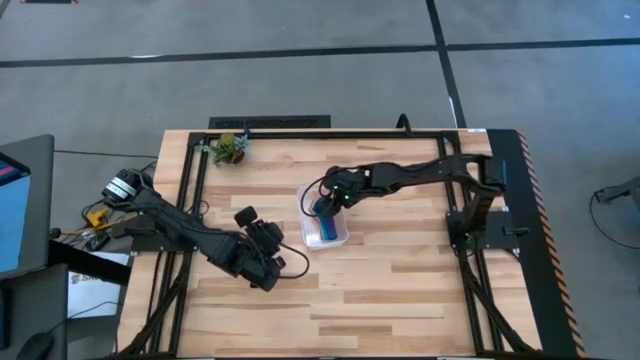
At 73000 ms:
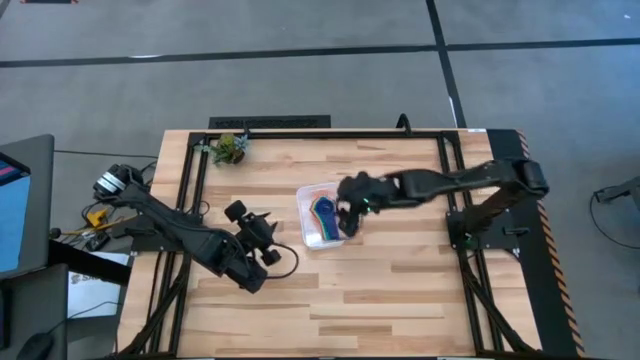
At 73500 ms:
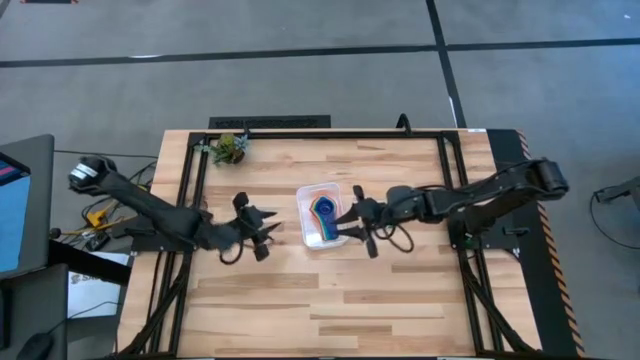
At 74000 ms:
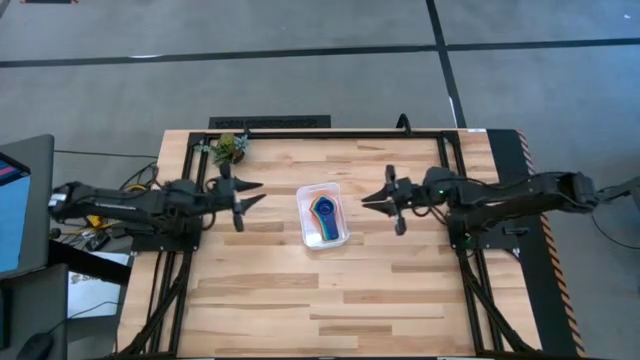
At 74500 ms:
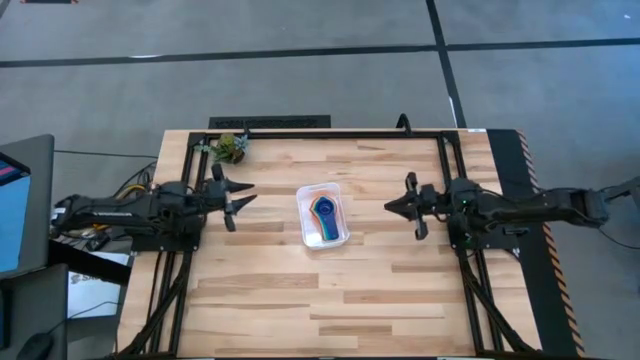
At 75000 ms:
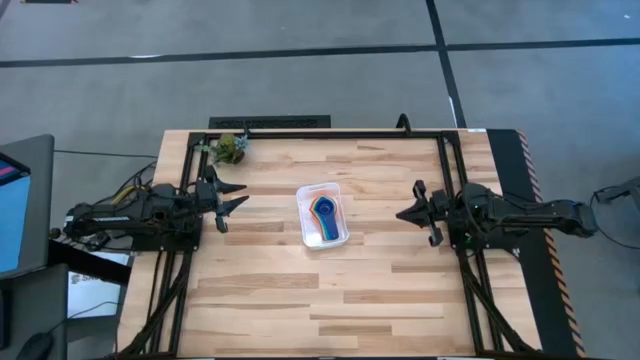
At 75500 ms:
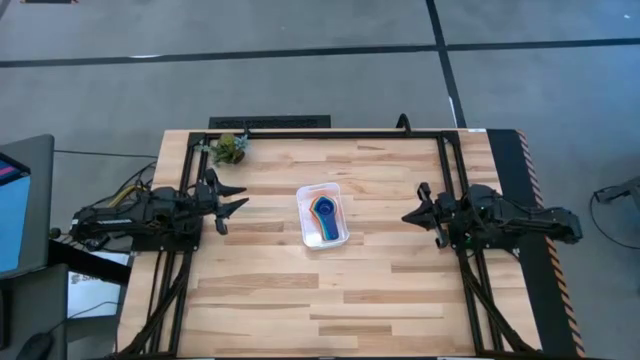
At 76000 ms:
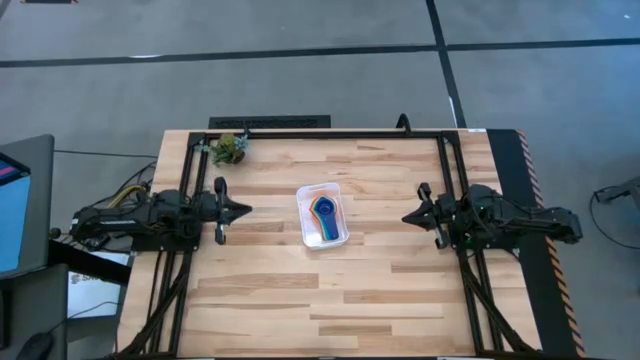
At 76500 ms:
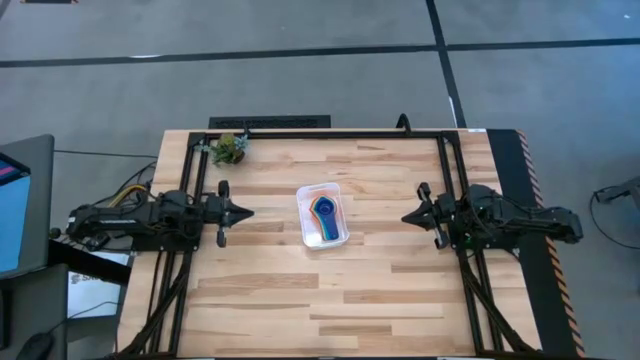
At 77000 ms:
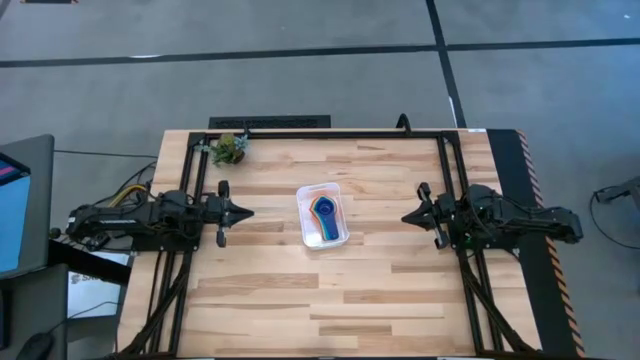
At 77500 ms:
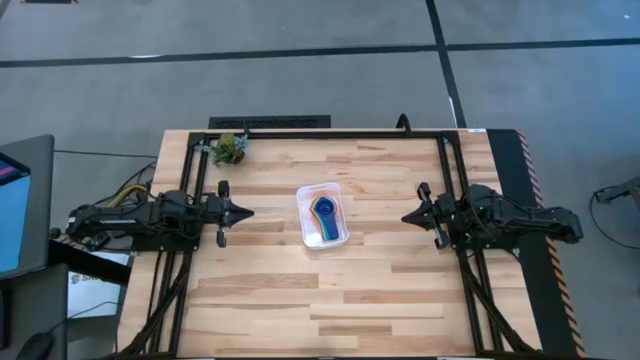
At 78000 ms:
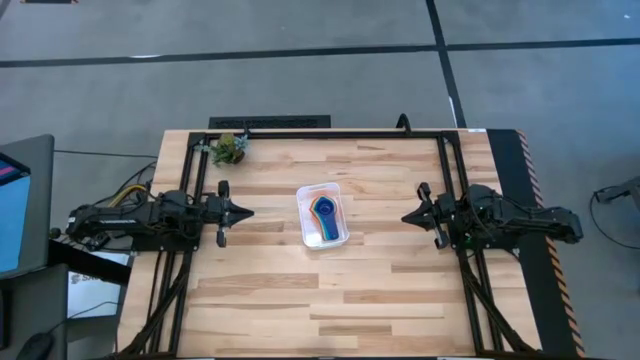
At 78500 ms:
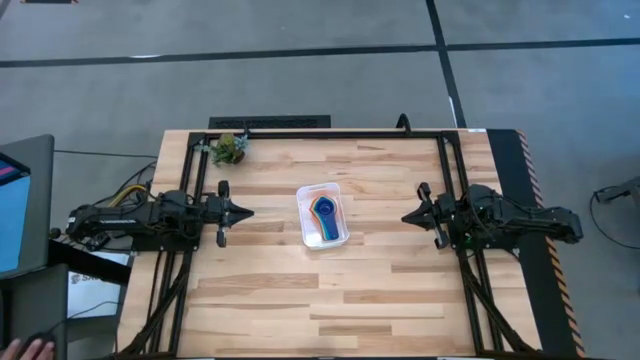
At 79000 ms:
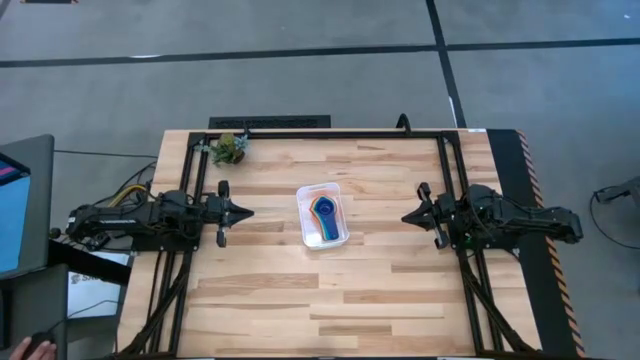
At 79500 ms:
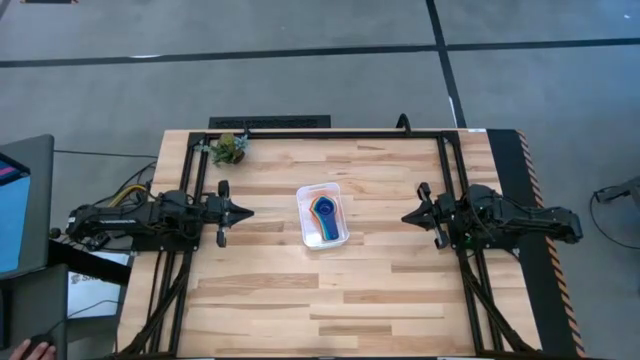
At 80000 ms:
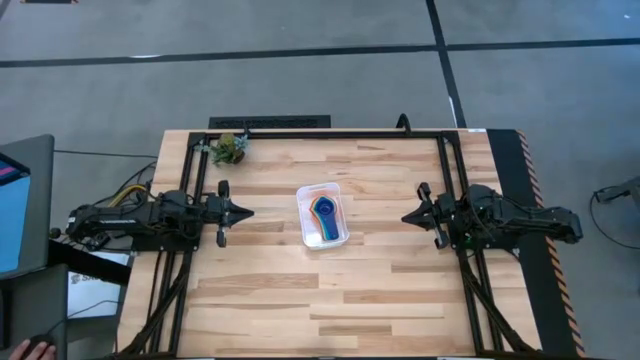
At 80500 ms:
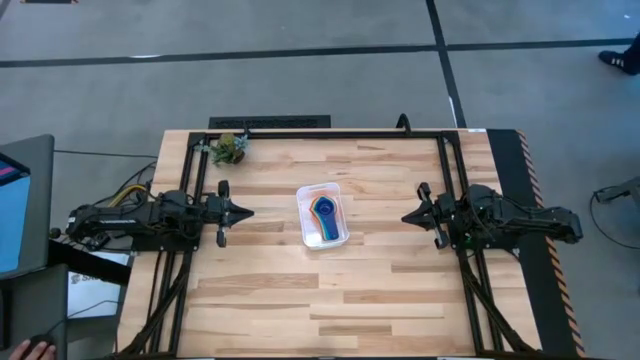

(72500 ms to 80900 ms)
Task: Nest measuring cups in basket
Return to Home Position

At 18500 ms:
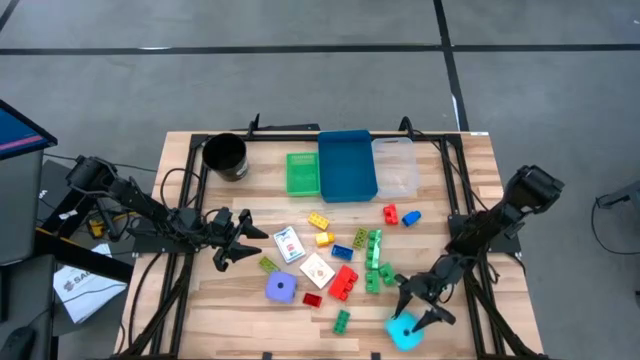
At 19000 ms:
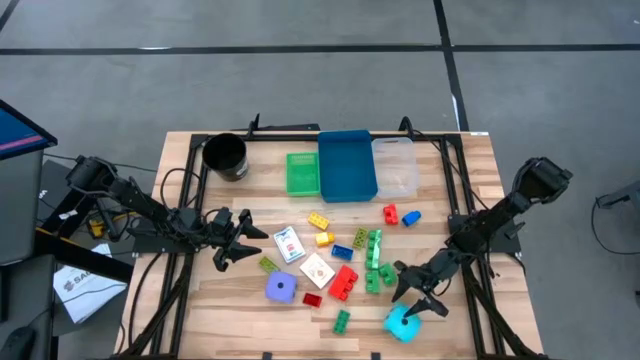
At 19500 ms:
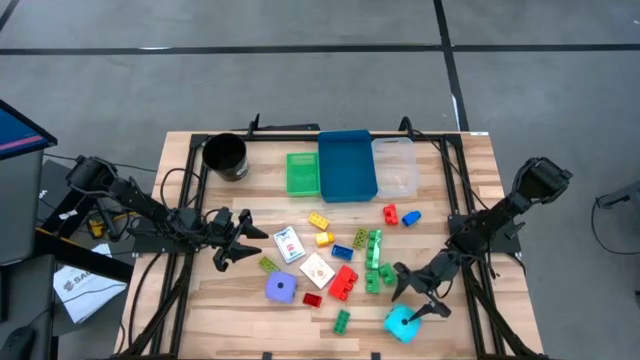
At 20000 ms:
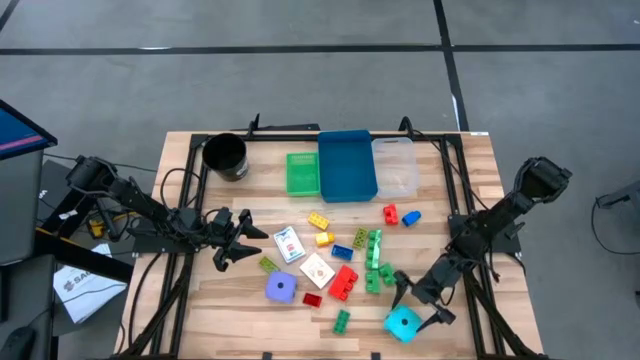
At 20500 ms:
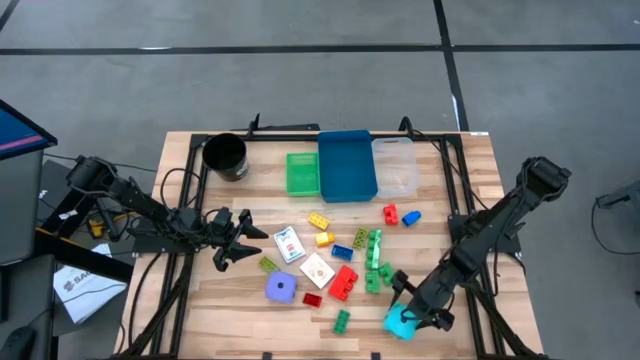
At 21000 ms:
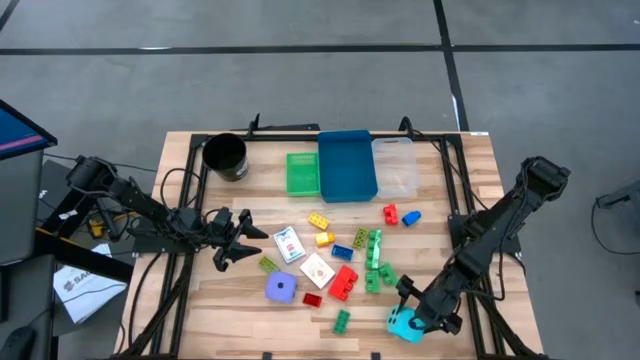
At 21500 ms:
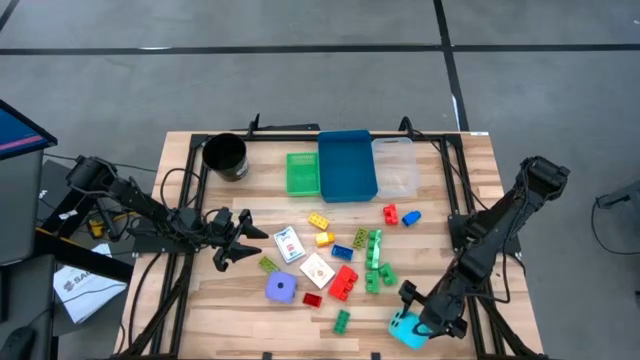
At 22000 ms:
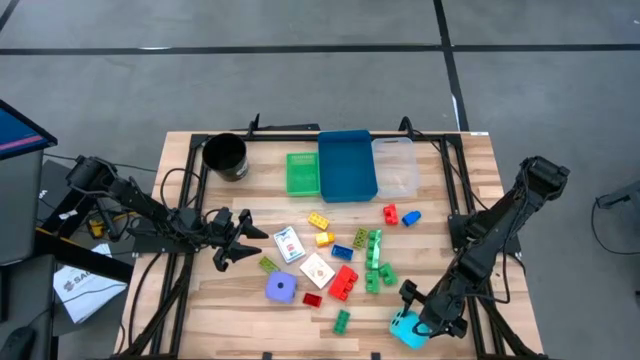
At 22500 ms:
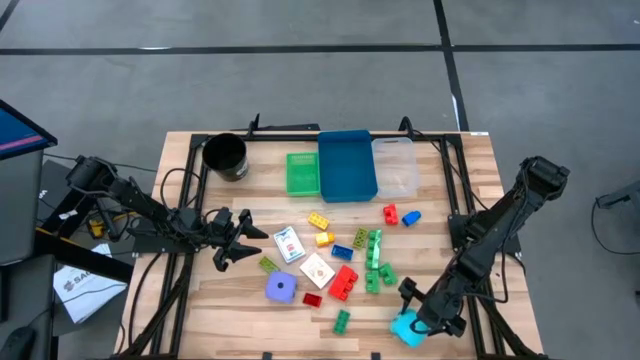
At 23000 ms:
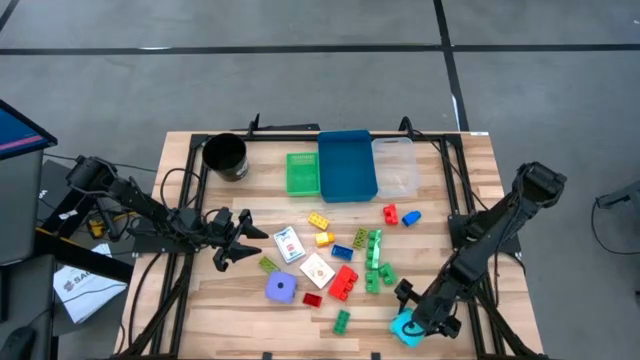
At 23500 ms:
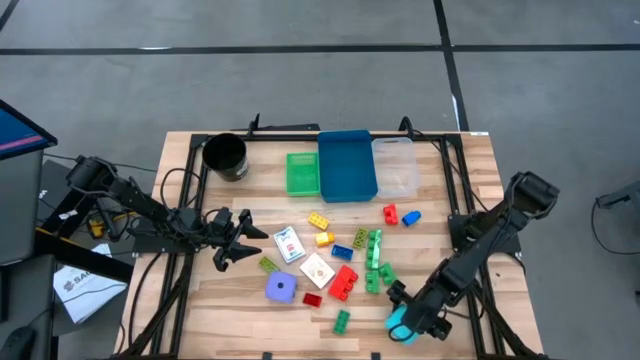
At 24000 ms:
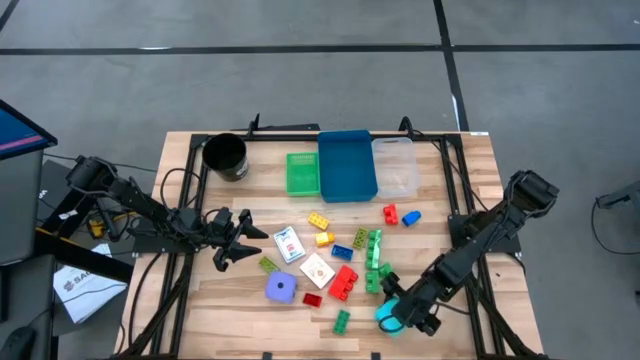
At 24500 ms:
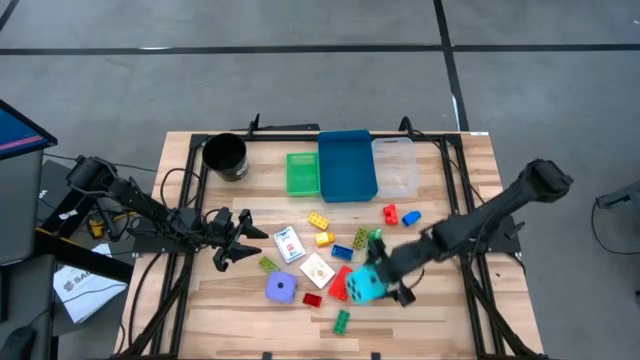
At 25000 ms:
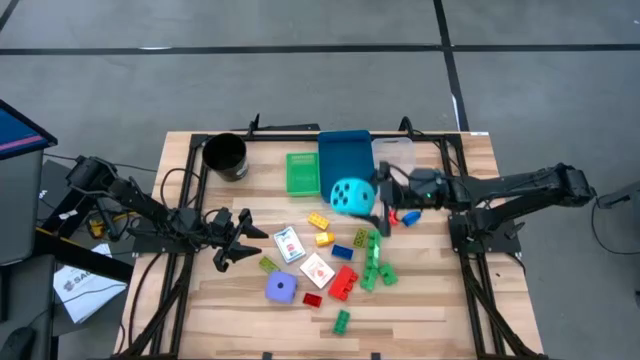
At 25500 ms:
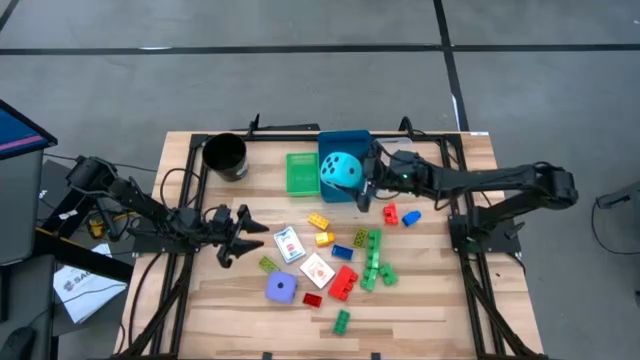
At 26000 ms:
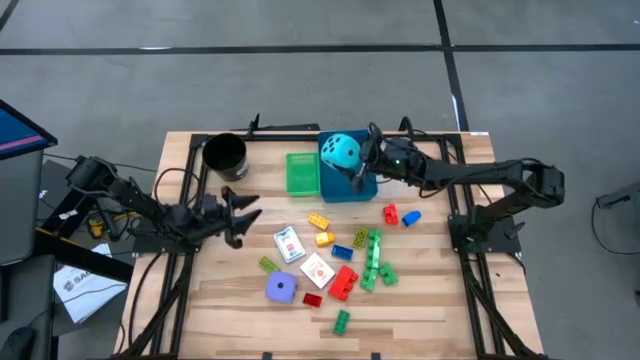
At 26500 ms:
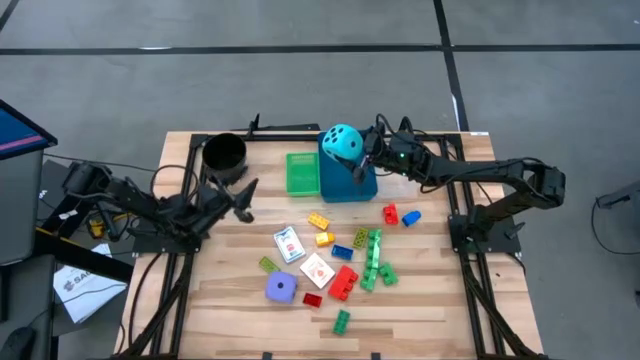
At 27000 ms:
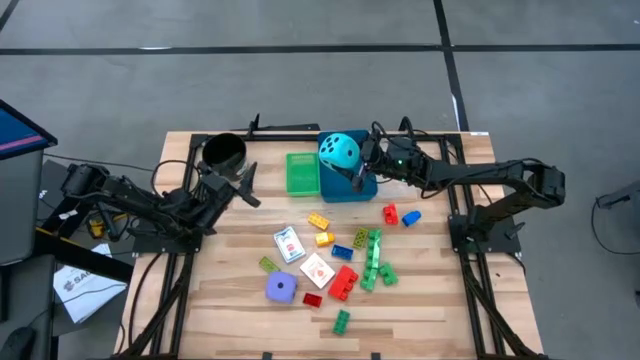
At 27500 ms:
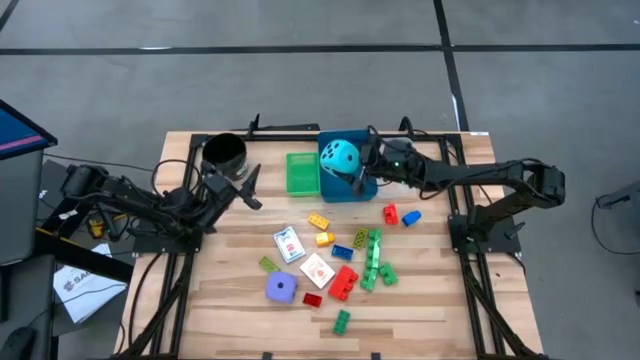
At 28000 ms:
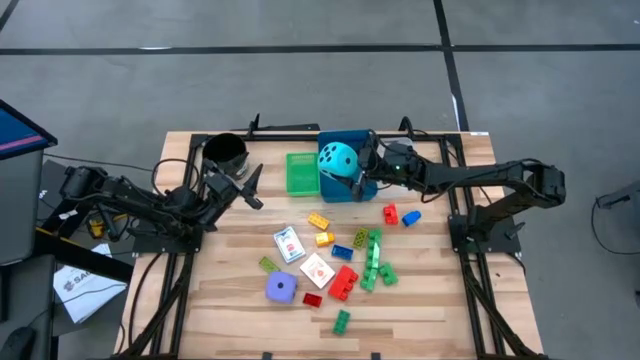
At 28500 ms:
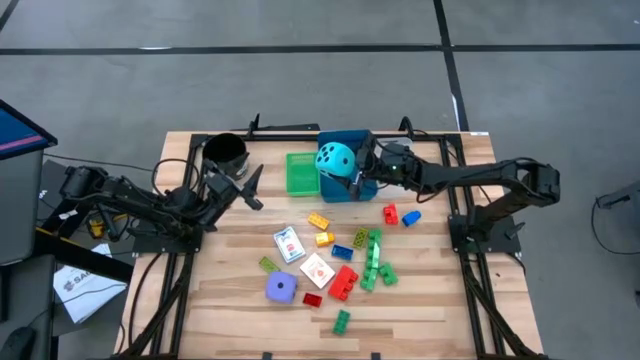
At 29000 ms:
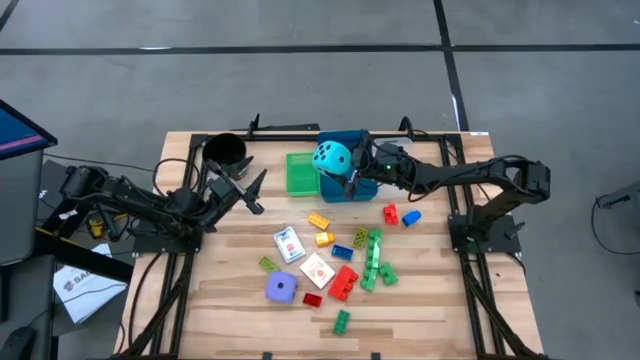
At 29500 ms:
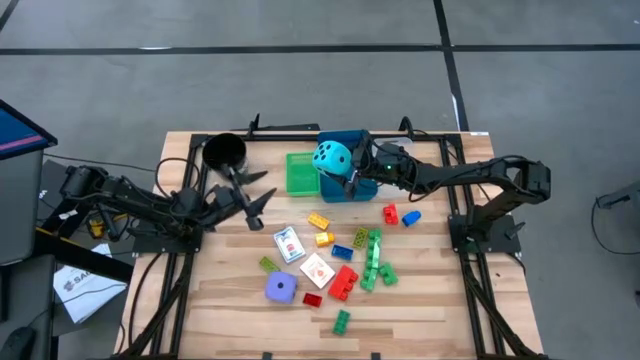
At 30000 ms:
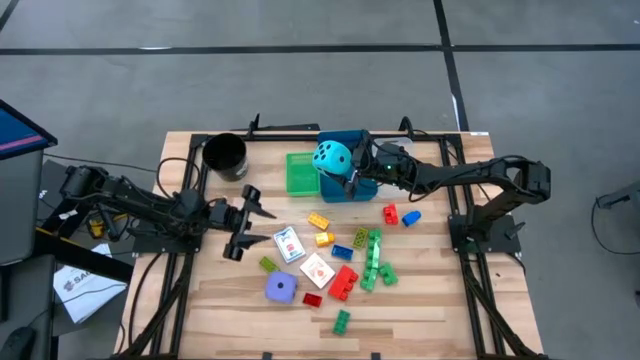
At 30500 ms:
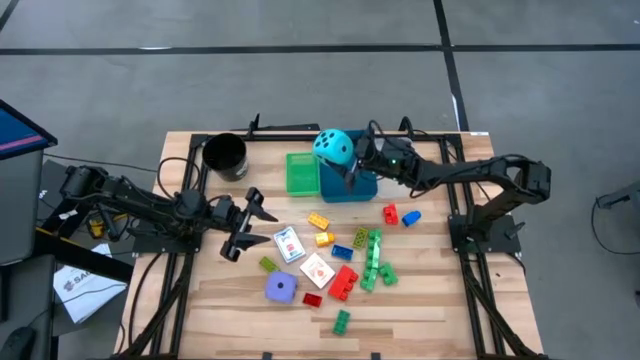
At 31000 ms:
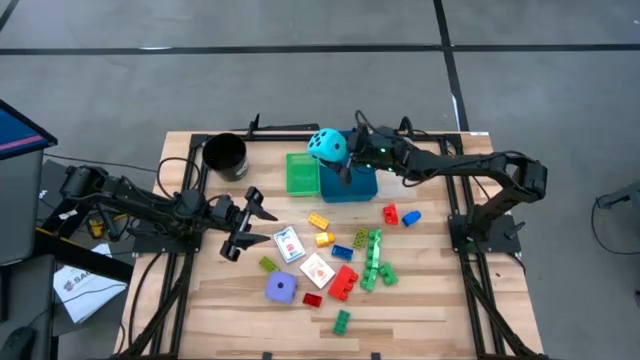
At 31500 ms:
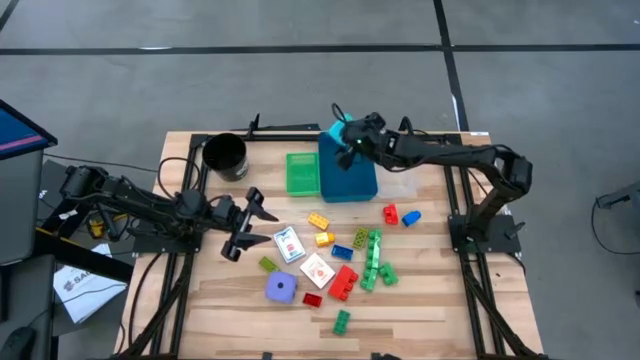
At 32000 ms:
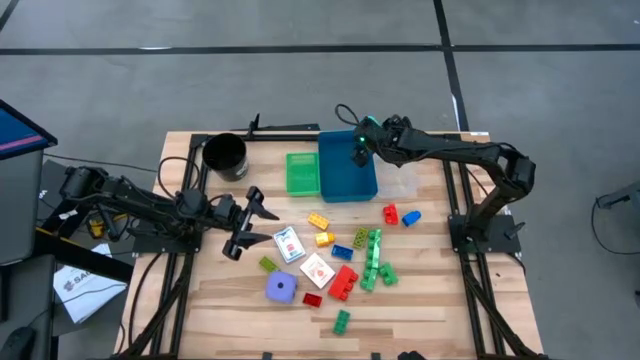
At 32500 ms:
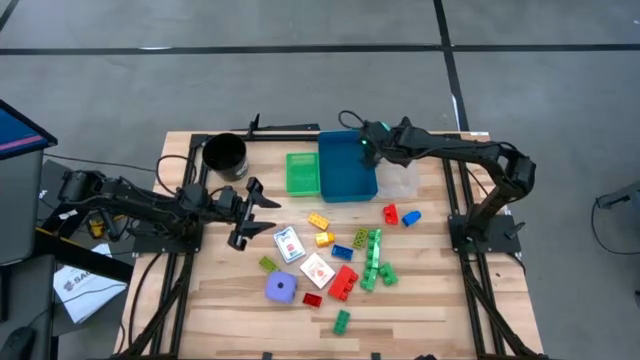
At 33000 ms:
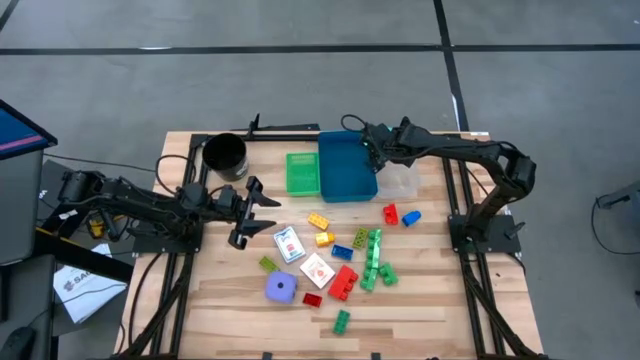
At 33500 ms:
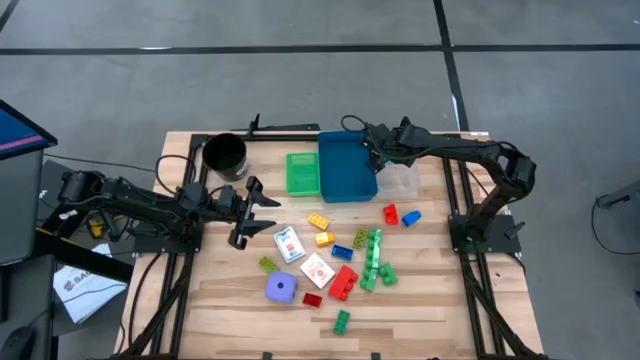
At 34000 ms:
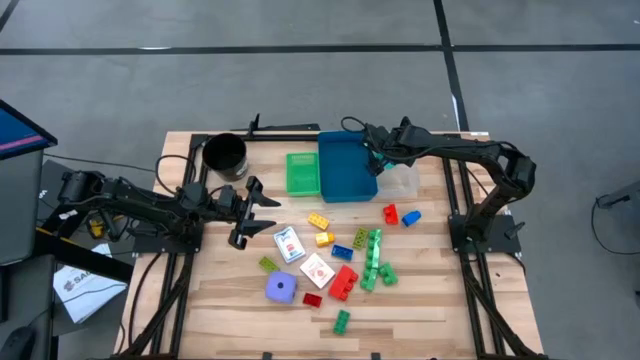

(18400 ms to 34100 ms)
Task: Pick & Place Toys
Put the light blue dice into the transparent bin
